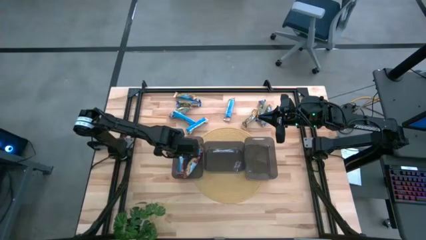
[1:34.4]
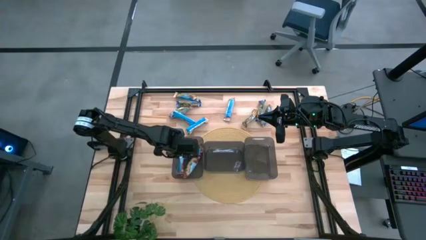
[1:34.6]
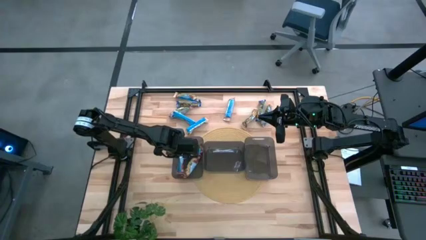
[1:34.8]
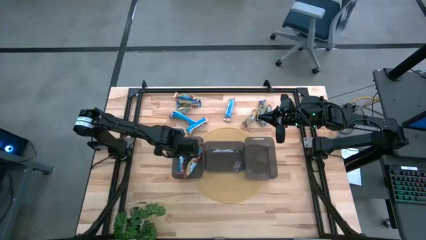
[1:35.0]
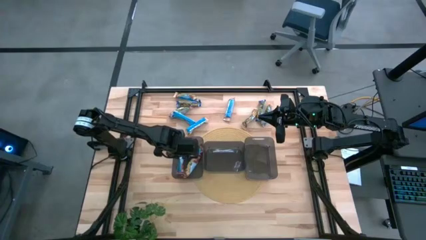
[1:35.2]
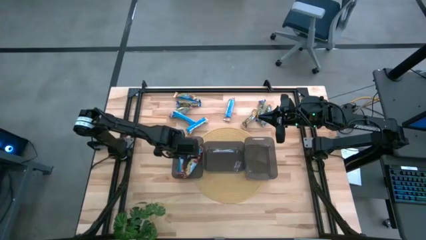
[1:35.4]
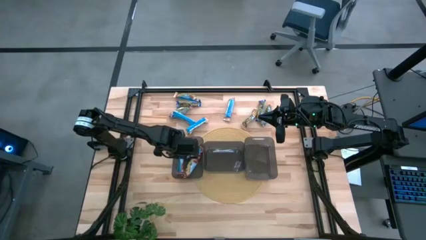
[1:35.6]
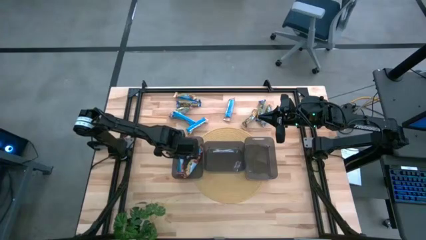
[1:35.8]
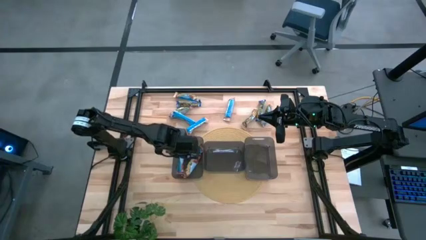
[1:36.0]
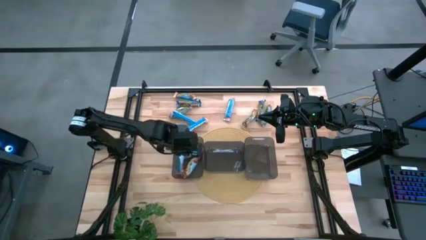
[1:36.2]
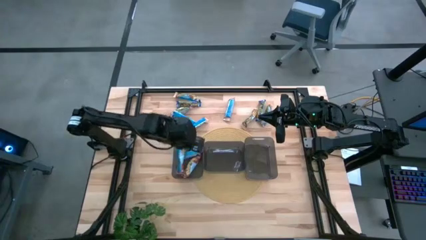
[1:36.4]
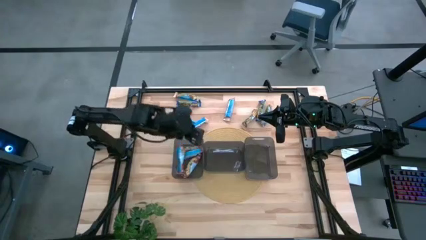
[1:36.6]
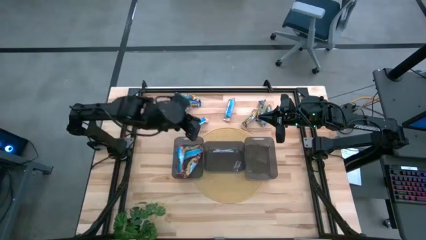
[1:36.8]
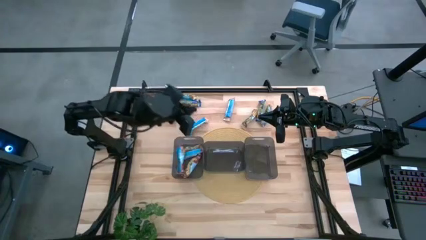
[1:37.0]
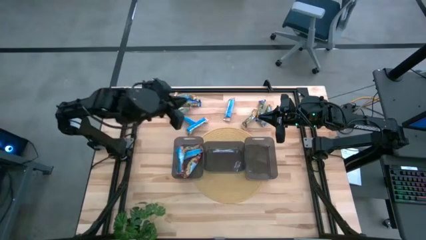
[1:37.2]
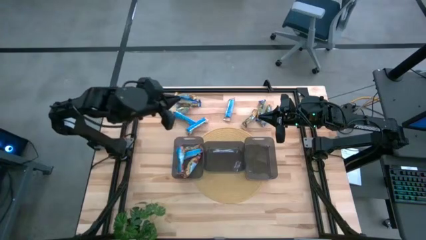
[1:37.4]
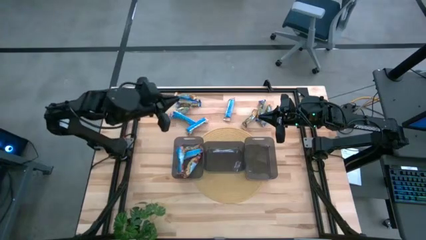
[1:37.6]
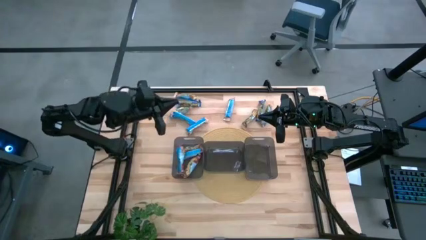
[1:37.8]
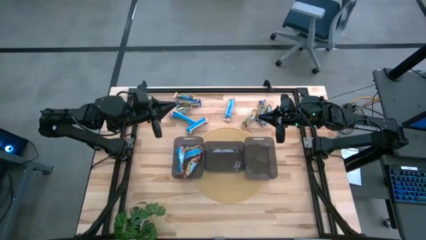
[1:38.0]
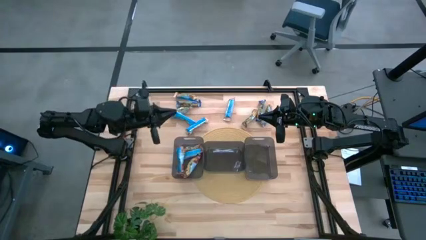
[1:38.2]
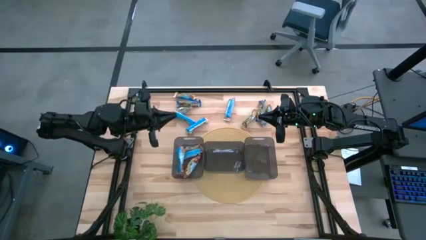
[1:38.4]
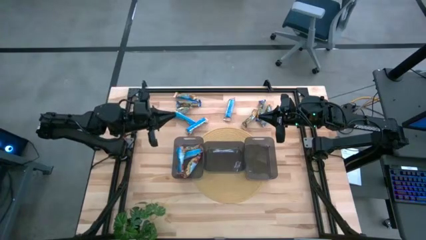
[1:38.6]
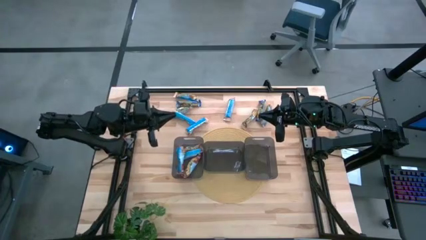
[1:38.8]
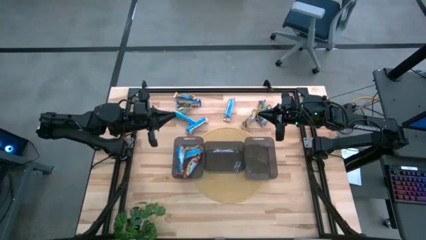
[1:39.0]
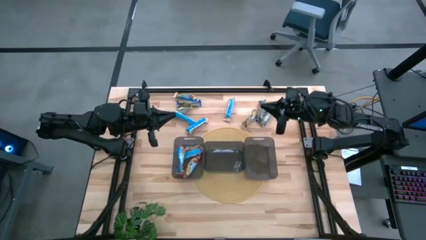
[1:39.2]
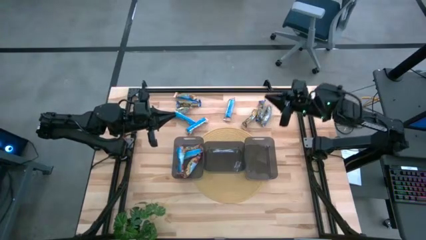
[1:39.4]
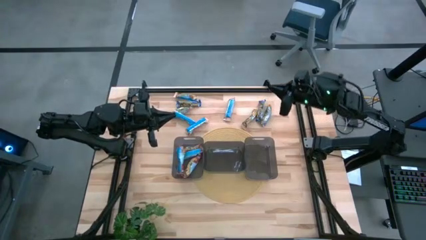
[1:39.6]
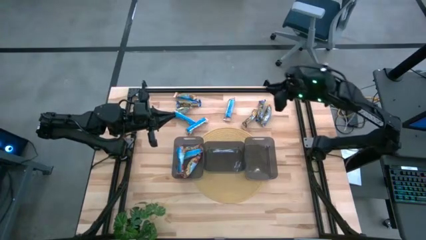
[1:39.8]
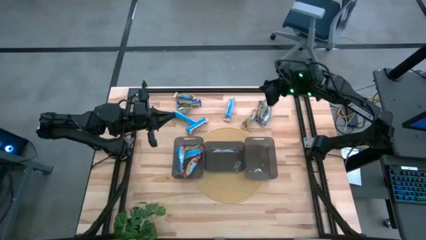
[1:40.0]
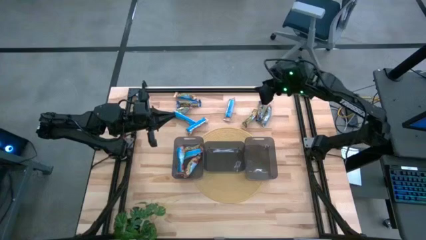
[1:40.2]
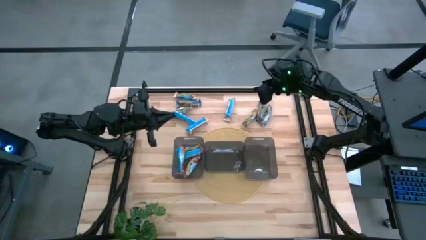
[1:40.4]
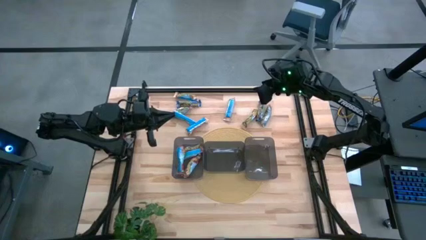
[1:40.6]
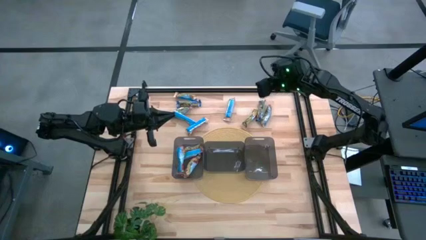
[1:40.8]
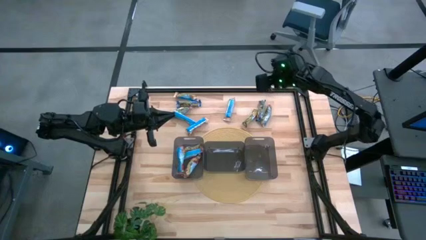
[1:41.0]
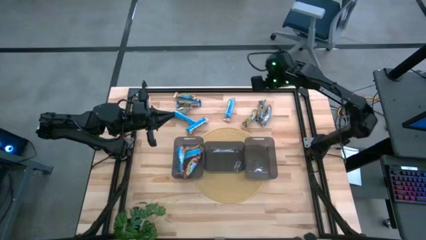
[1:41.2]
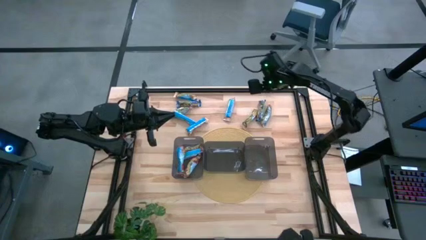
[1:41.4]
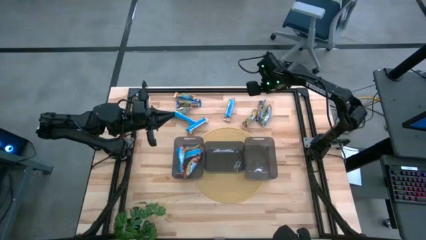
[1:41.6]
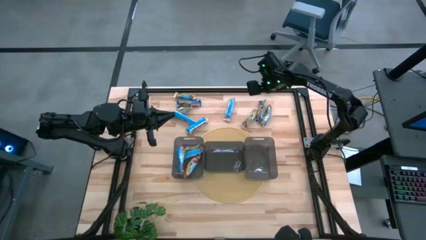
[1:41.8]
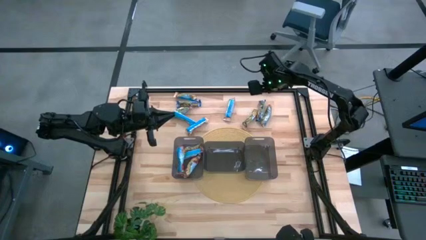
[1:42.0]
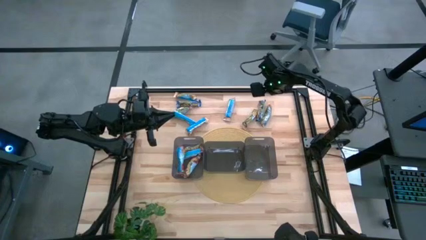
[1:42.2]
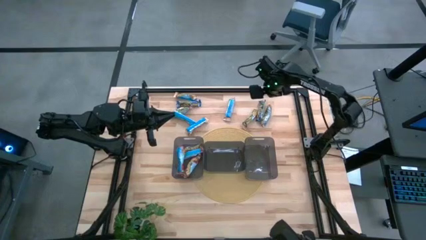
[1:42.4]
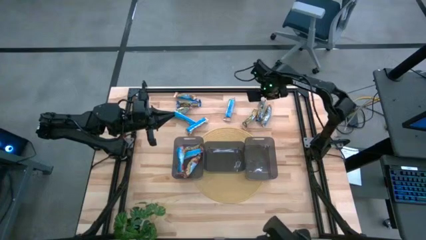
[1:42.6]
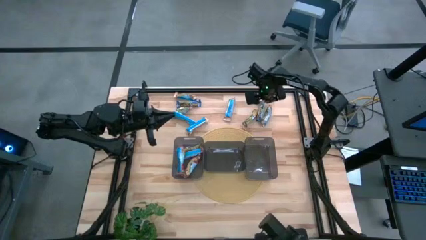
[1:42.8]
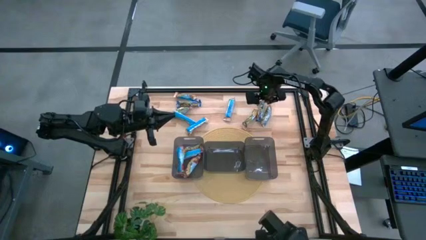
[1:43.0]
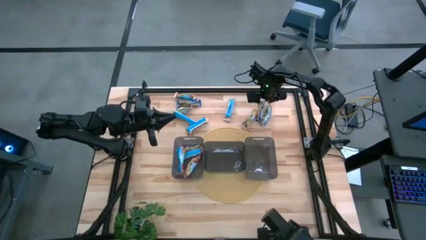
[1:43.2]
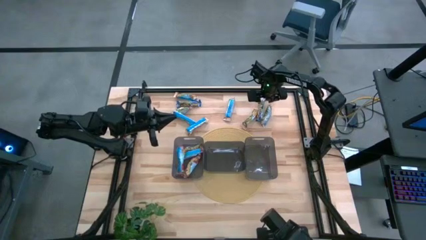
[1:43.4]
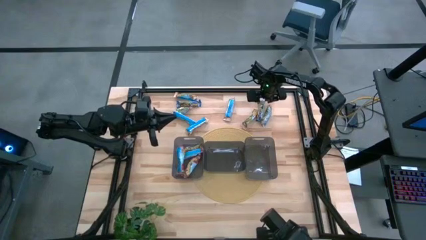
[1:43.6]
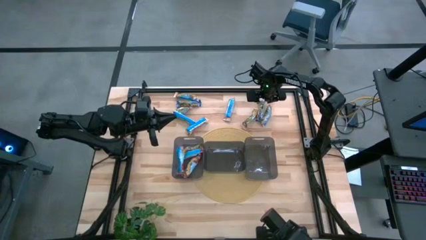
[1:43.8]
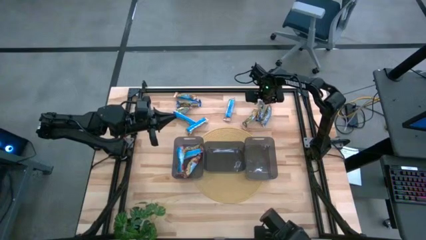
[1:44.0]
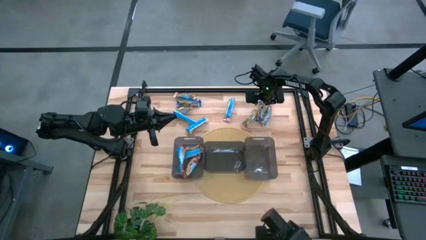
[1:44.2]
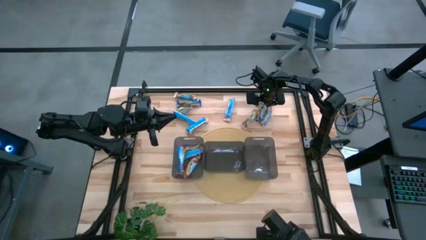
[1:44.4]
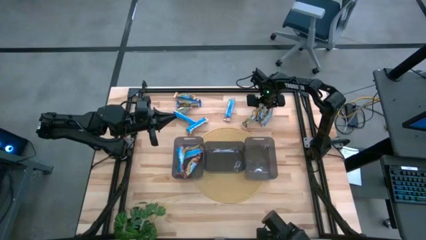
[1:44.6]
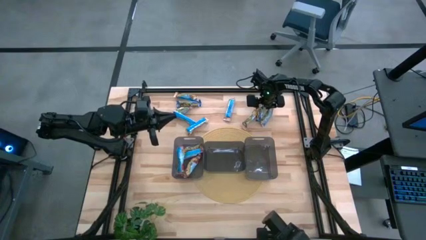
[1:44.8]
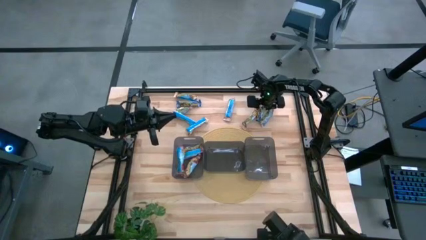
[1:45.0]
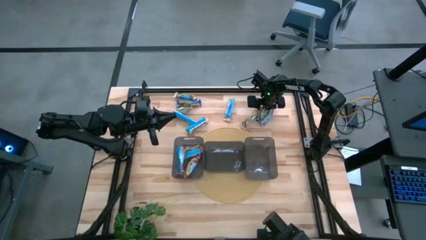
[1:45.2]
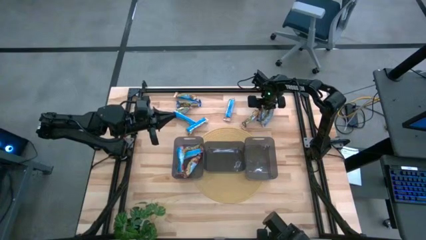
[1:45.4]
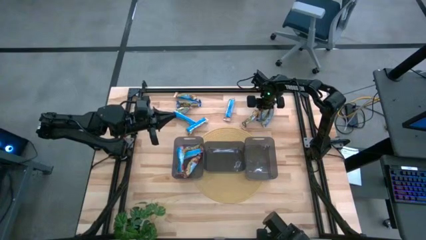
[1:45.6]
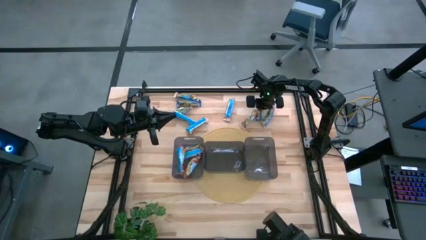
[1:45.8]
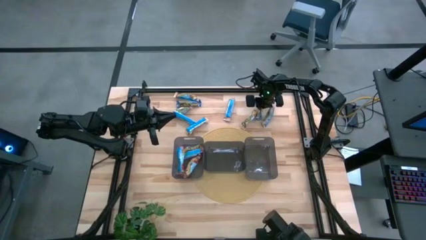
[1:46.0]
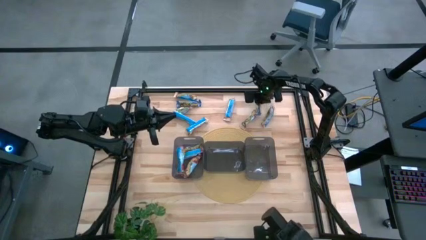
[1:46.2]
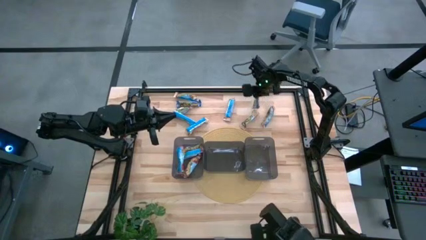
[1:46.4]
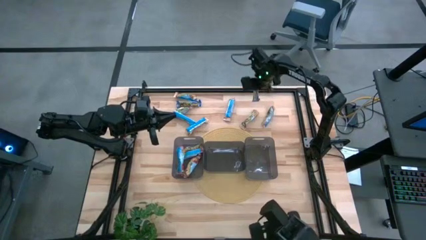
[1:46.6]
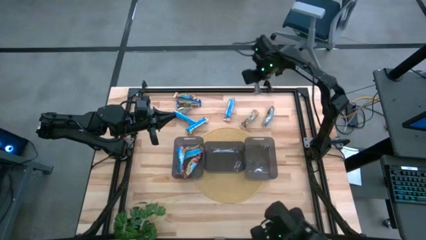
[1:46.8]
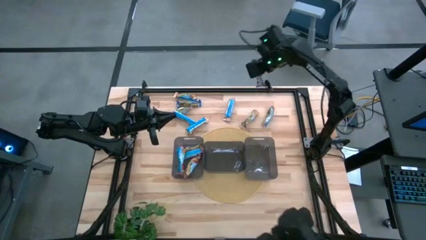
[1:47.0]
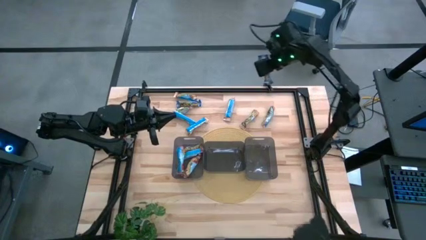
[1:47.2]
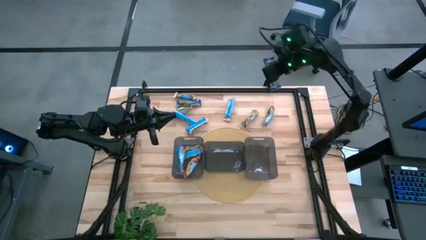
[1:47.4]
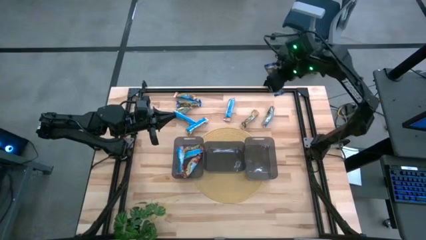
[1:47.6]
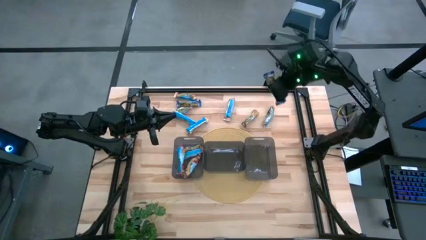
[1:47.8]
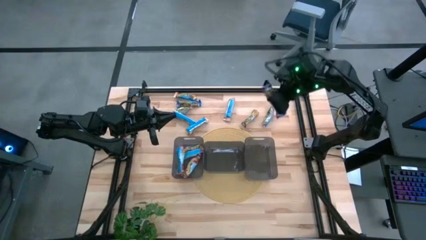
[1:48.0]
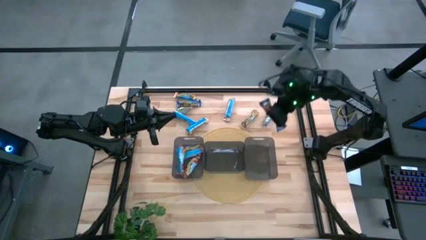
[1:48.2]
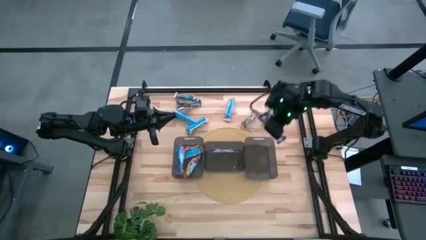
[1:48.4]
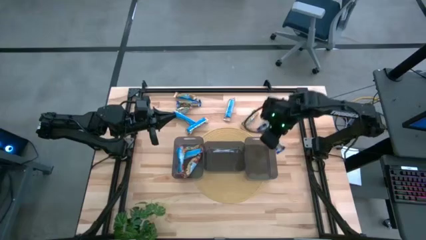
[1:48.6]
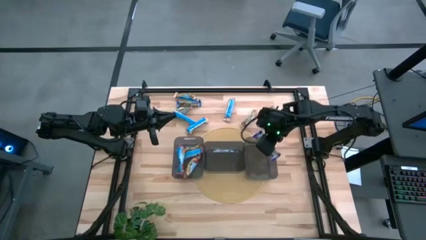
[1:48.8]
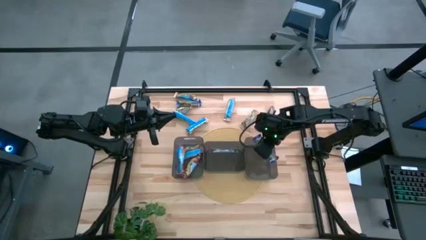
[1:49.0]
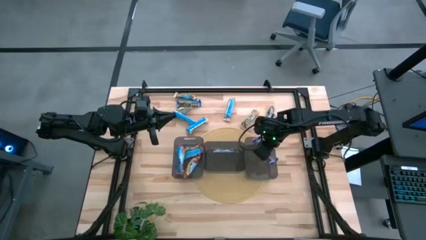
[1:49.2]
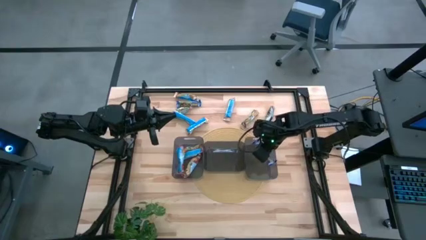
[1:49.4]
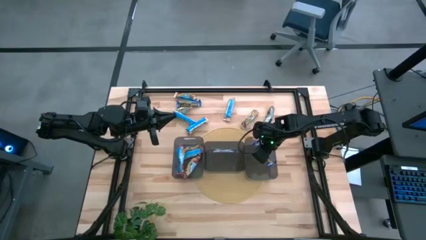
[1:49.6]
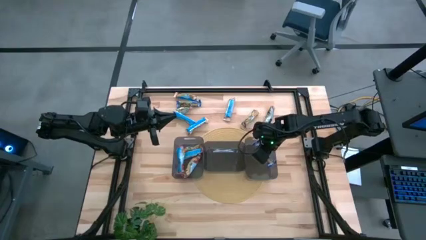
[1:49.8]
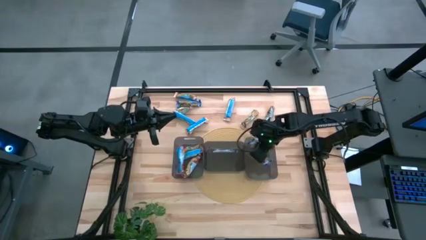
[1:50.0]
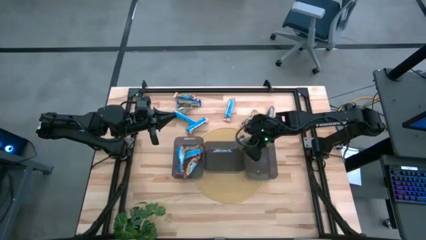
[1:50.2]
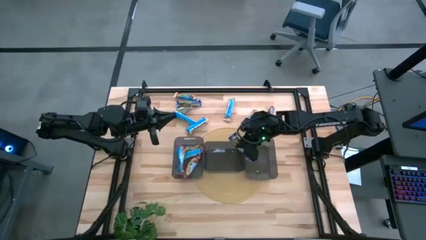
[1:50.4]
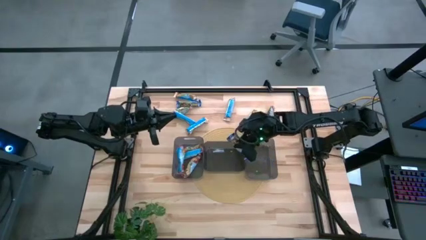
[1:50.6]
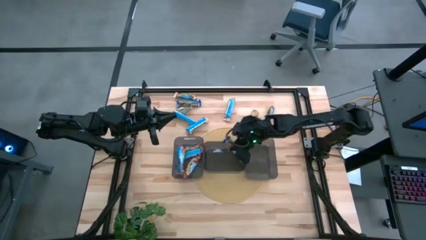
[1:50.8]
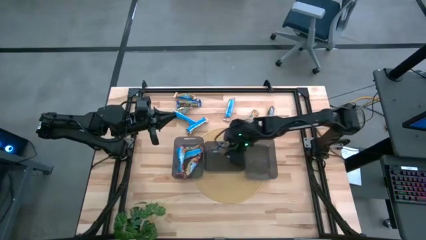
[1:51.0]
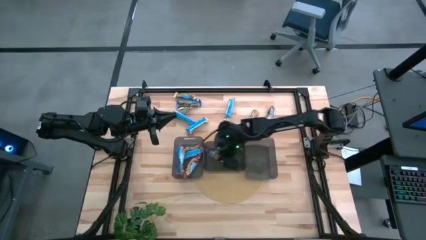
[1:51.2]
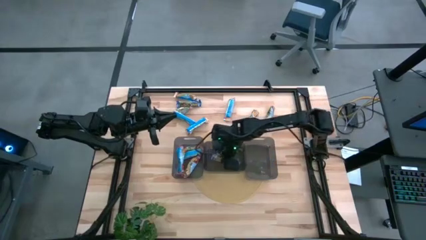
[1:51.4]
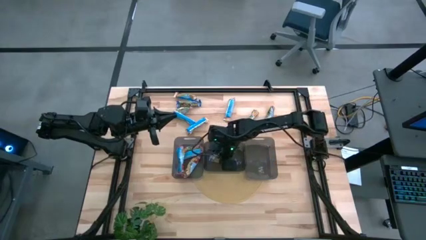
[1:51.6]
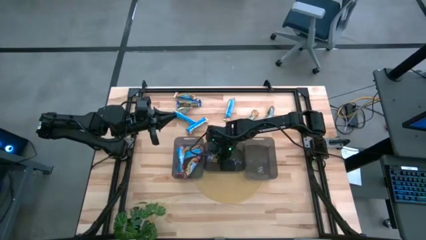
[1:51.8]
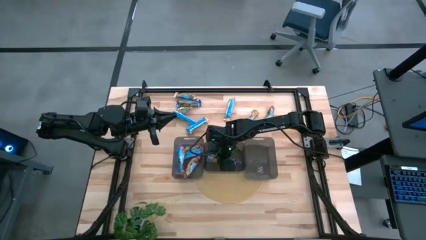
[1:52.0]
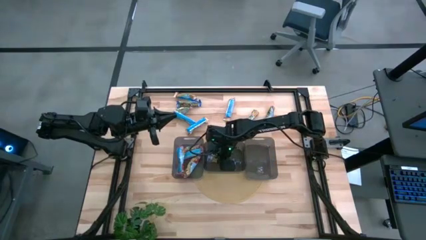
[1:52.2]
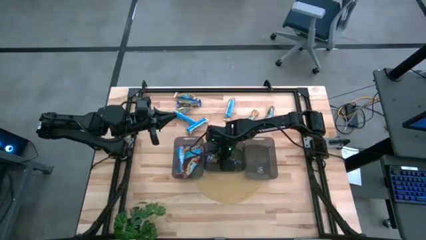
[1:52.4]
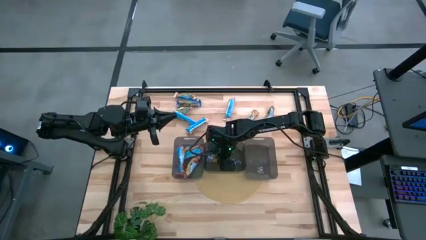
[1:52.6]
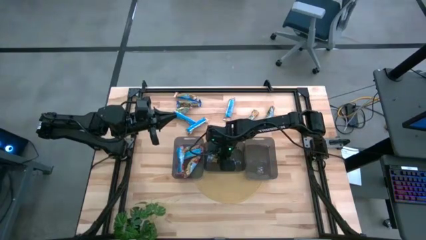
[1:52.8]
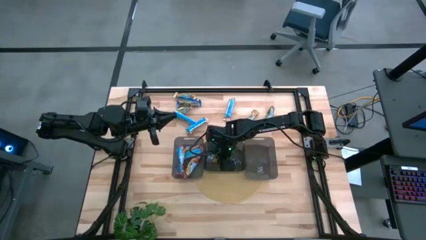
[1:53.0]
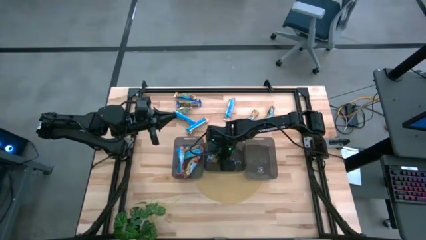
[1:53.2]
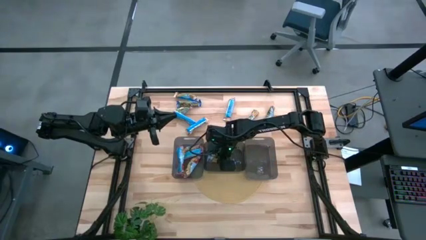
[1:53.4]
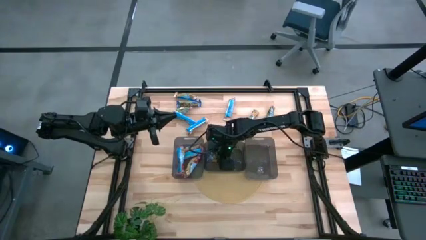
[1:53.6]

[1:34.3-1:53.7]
Task: Pick and place Granola Bars by type
Put the blue granola bar into the center black bin
